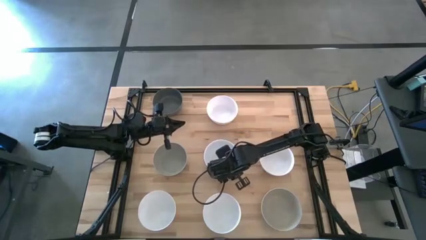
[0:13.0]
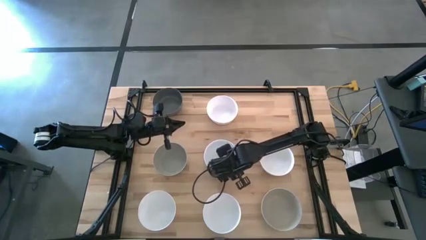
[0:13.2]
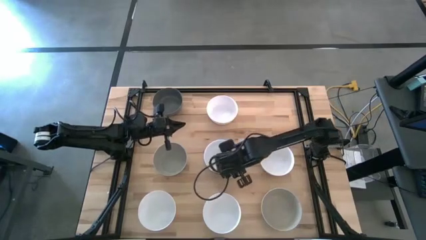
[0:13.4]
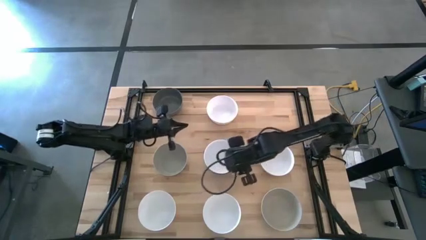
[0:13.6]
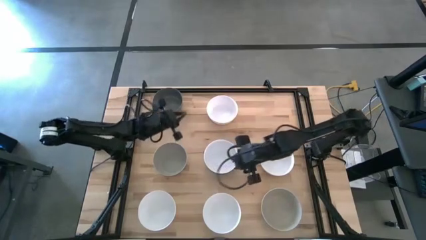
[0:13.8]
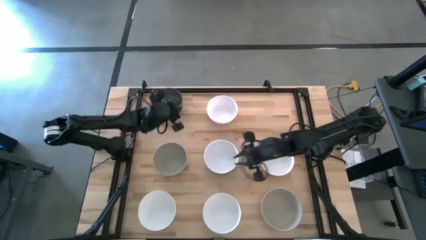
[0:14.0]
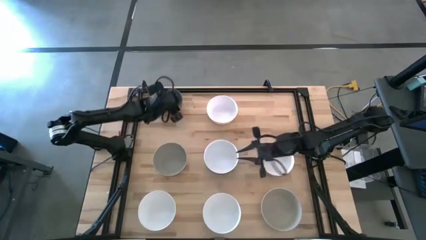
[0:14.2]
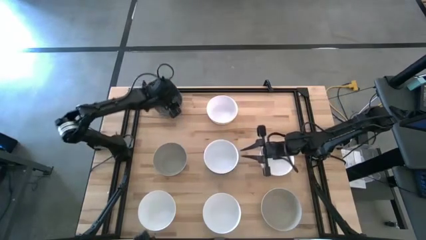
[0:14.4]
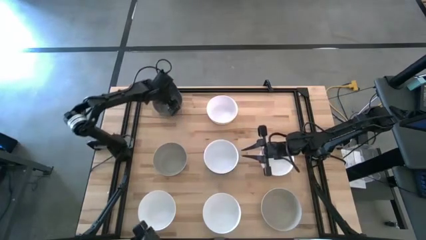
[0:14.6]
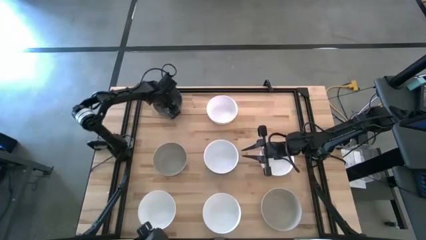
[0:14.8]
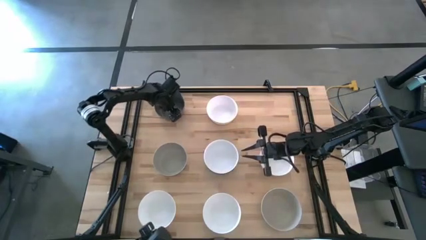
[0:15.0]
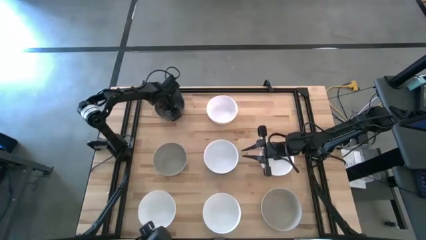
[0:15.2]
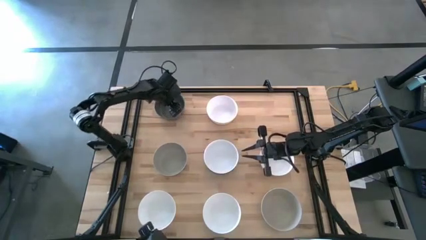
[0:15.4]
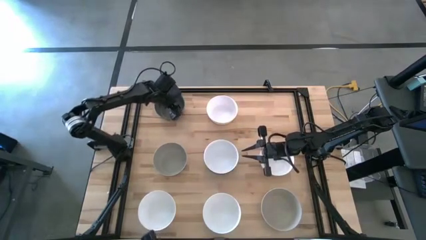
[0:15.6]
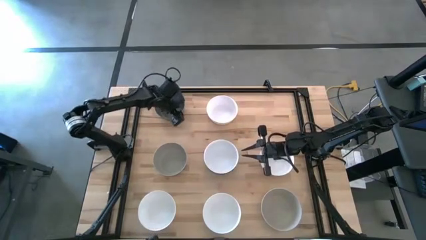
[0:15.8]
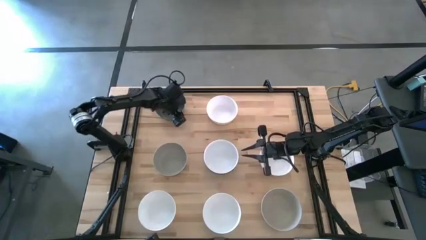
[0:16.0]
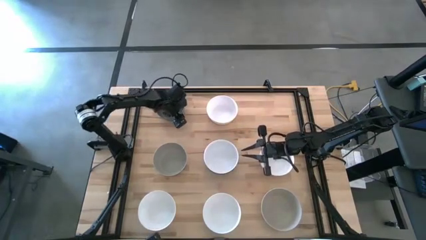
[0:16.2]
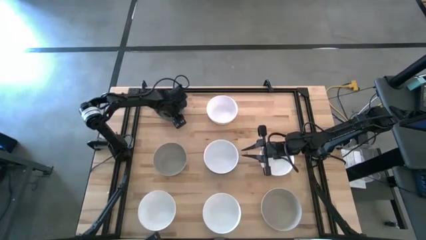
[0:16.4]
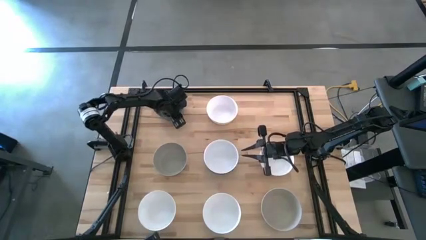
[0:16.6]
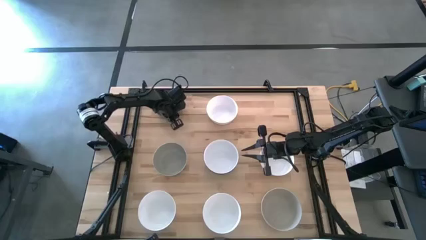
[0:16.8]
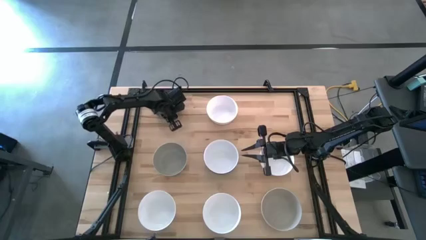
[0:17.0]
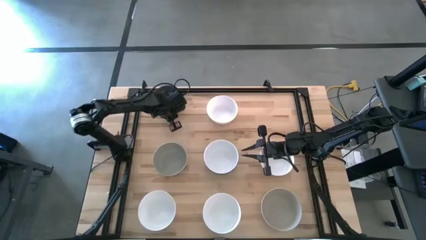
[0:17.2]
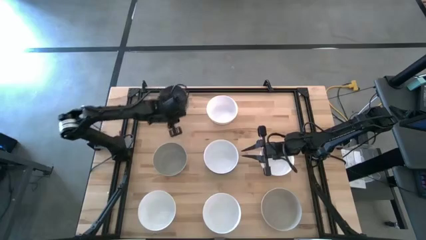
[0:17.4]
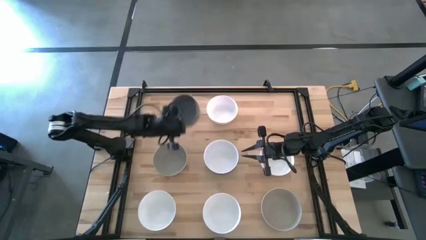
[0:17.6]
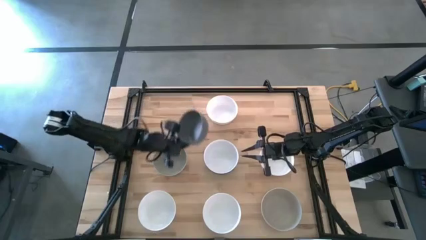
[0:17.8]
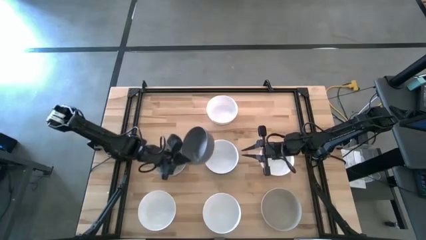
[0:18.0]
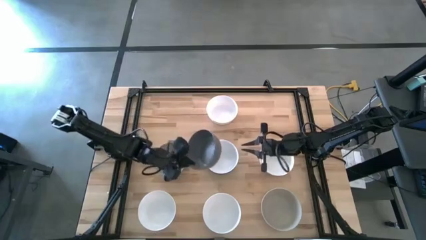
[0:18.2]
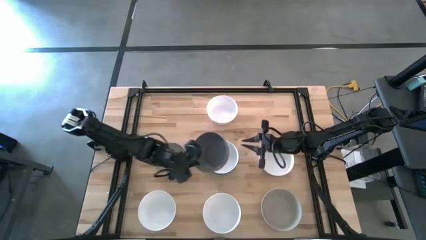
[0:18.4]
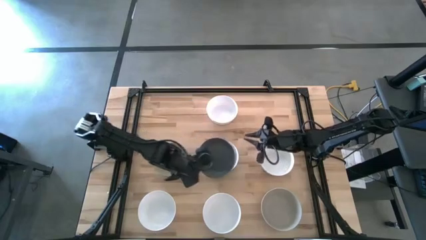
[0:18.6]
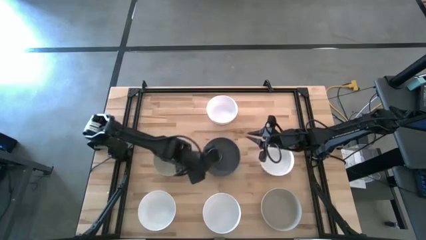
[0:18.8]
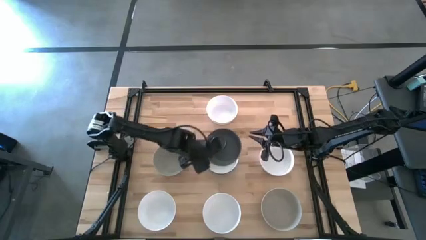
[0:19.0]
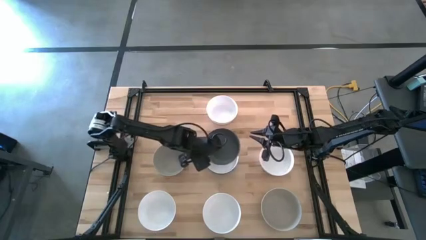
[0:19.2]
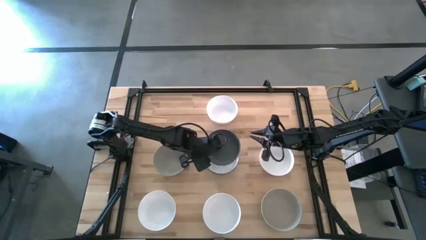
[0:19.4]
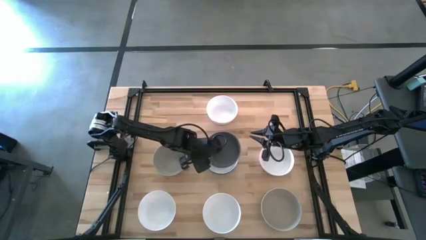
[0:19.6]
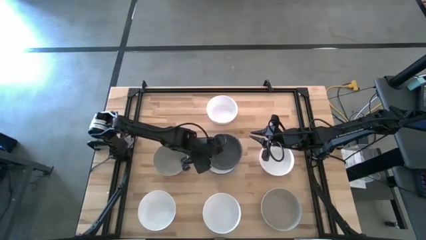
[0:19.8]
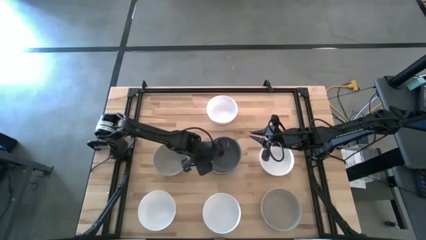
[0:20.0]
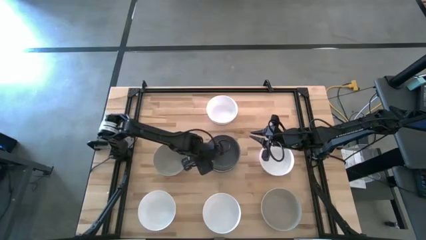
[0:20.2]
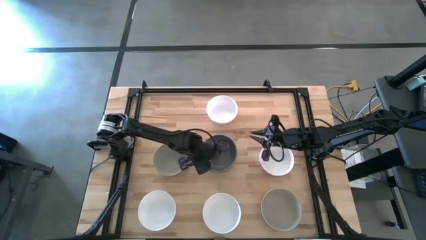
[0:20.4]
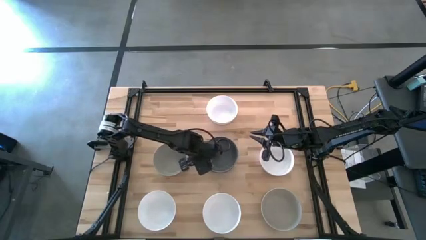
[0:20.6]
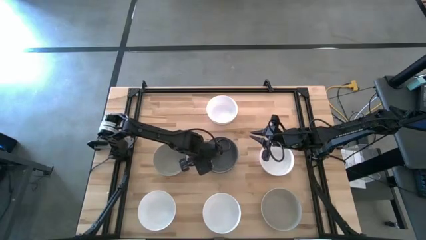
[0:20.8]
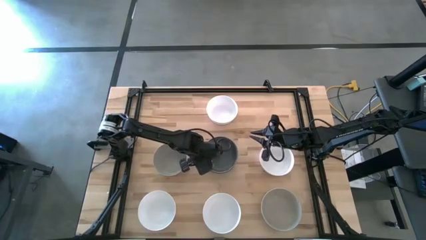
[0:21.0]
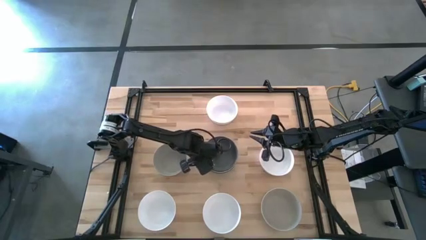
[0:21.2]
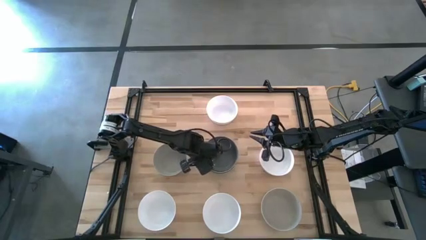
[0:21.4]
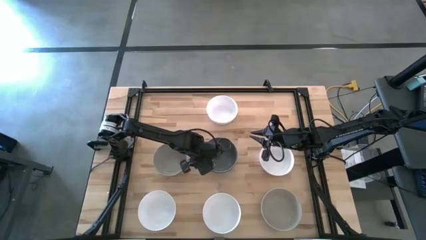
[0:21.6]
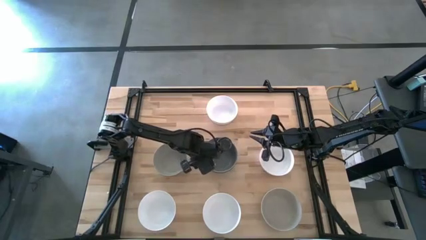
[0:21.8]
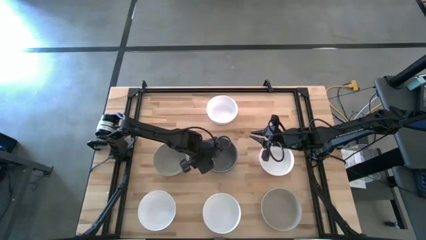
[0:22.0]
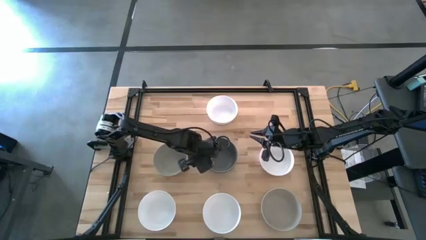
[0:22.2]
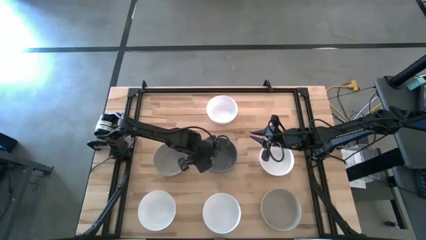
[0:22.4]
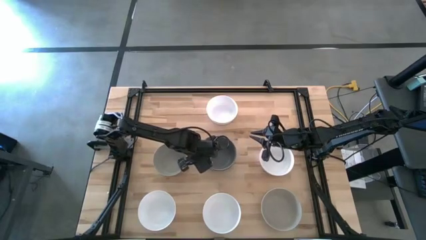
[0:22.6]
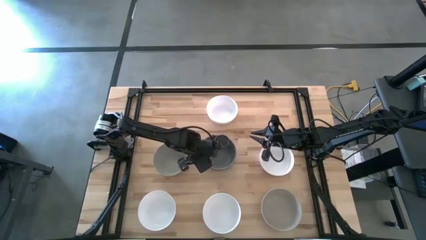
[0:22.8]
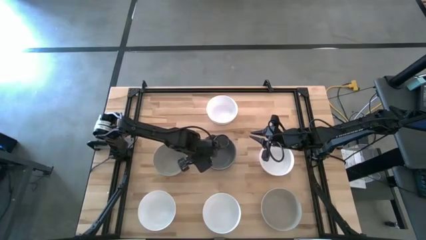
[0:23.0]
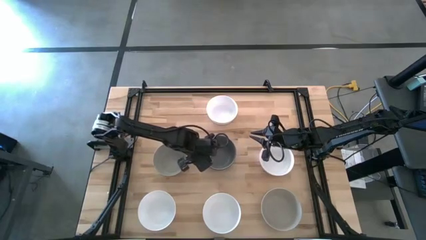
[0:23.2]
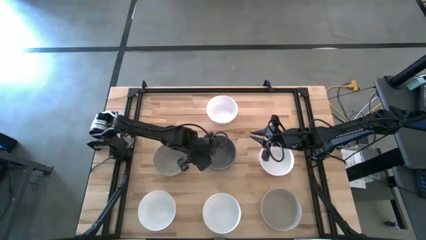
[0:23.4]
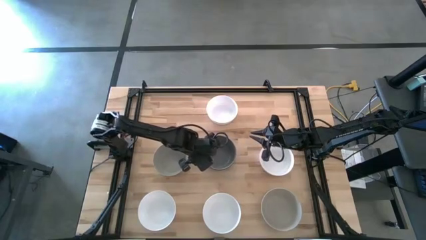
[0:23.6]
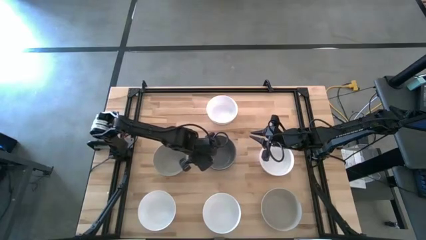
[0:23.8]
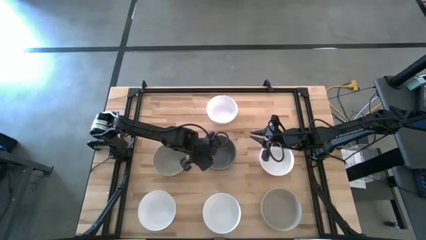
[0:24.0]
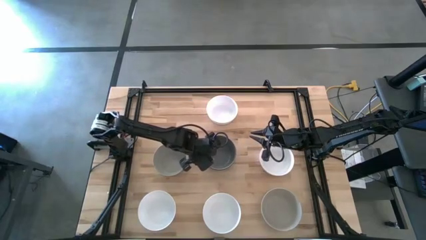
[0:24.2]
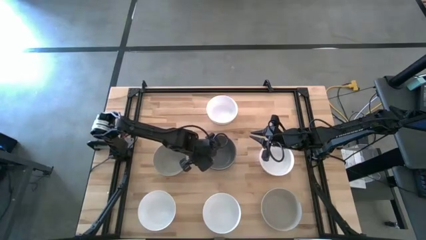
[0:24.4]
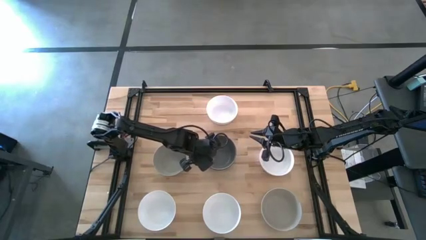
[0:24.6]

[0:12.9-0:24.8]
Task: Nest bowls inside each other
Stack the dark gray bowl on top of the white bowl

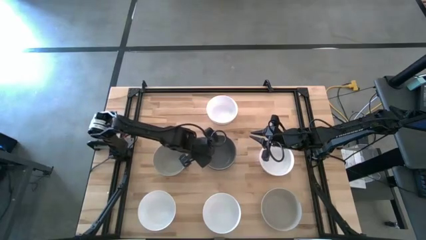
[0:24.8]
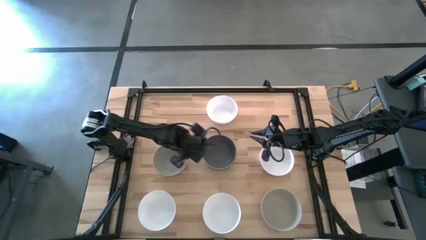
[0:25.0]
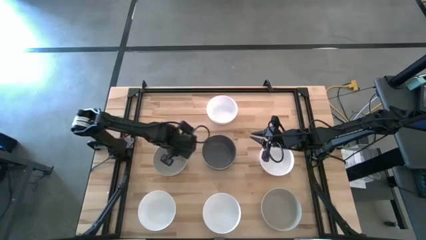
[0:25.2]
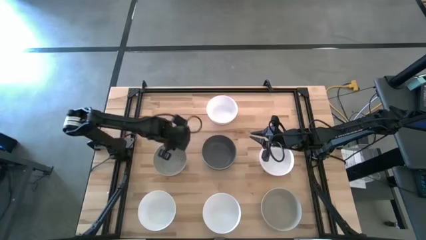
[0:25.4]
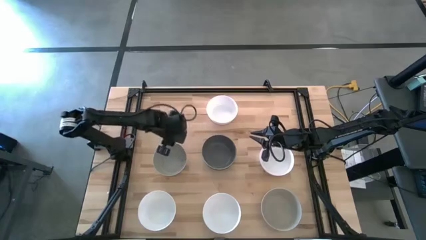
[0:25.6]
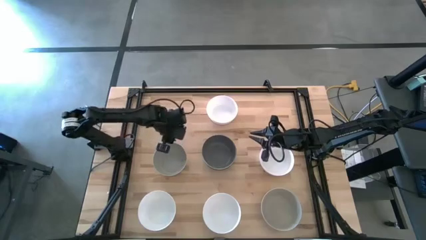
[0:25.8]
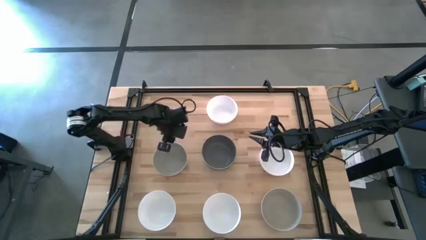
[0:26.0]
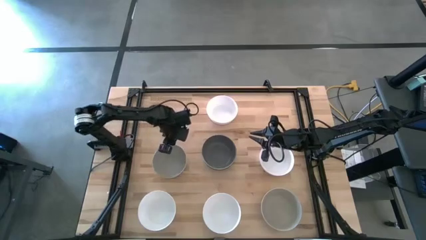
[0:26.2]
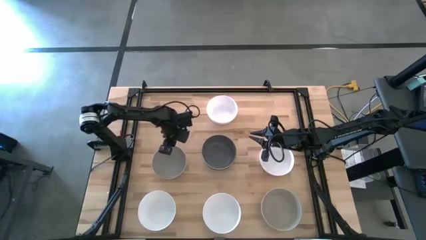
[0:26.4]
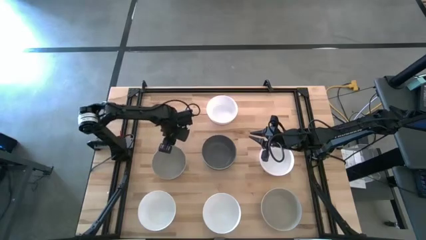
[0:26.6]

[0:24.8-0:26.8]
Stack the brown bowl on top of the dark gray bowl
